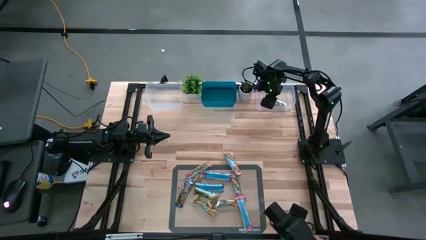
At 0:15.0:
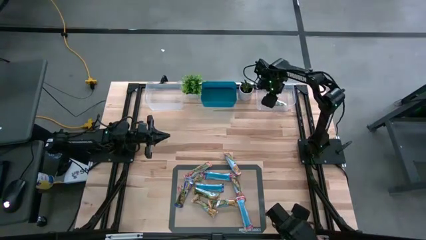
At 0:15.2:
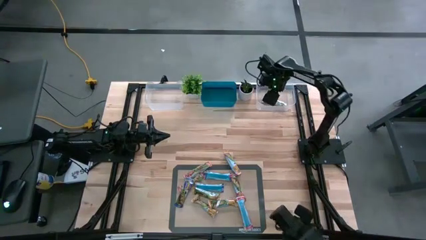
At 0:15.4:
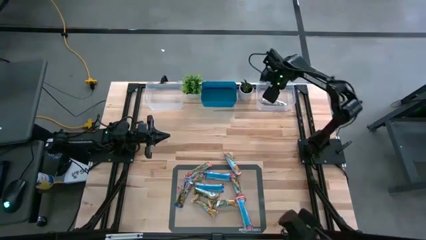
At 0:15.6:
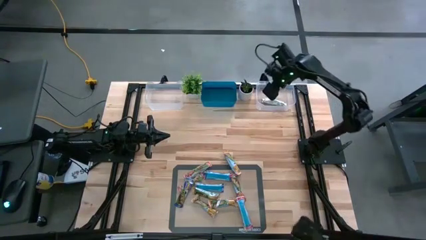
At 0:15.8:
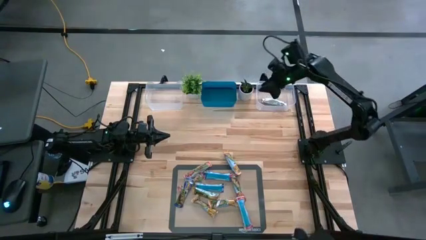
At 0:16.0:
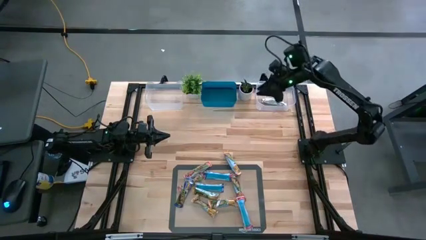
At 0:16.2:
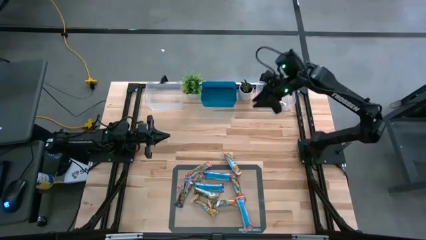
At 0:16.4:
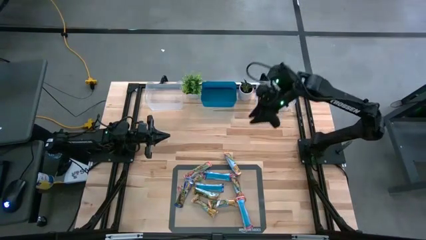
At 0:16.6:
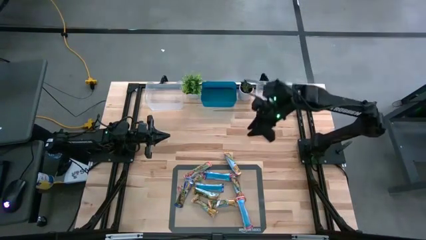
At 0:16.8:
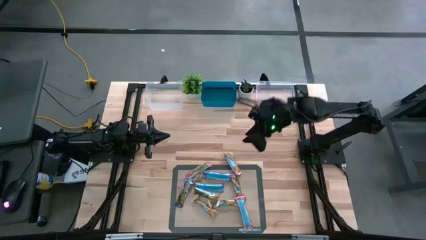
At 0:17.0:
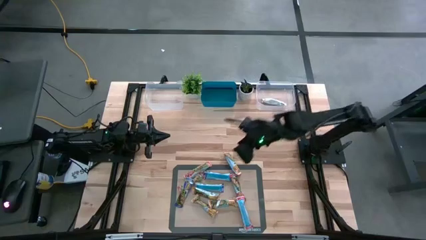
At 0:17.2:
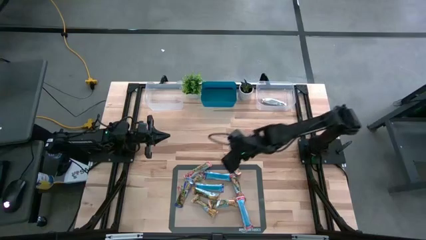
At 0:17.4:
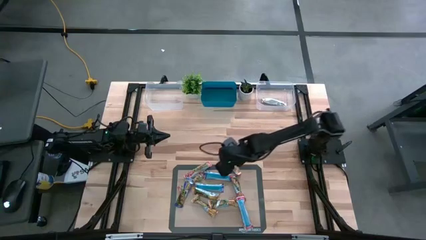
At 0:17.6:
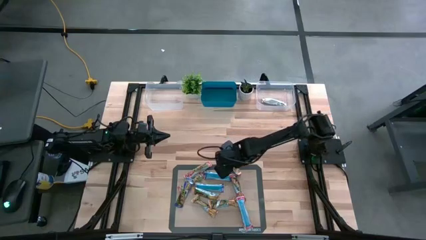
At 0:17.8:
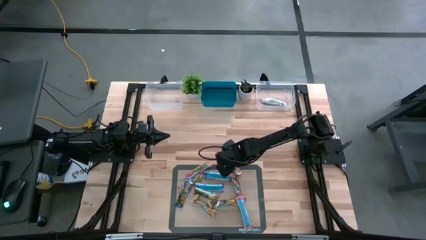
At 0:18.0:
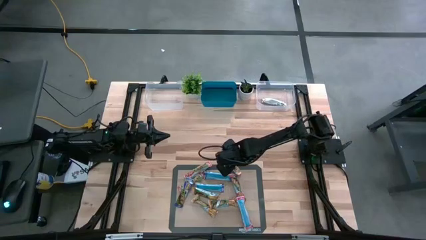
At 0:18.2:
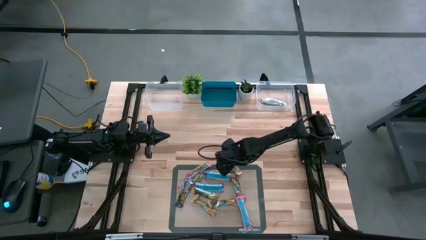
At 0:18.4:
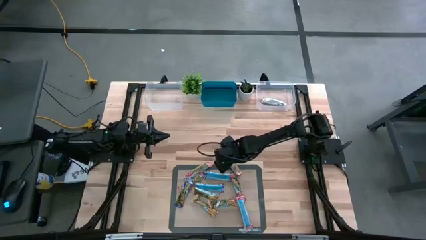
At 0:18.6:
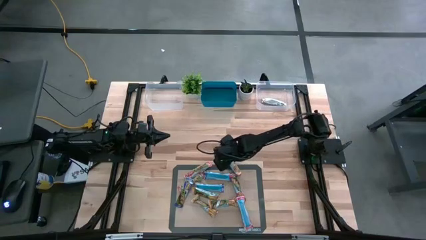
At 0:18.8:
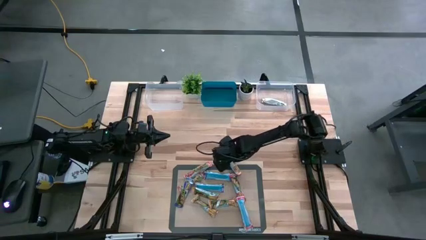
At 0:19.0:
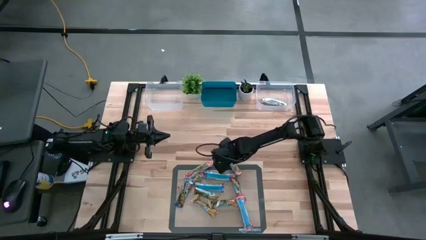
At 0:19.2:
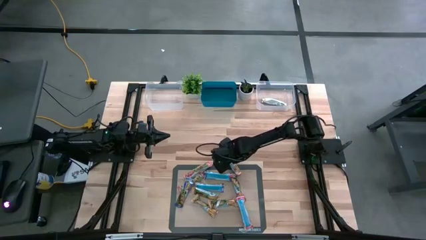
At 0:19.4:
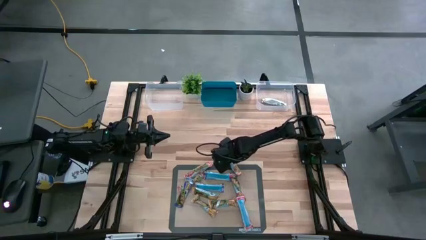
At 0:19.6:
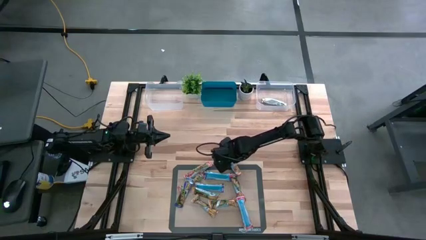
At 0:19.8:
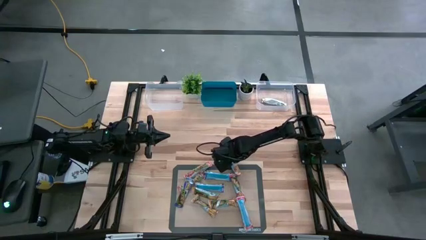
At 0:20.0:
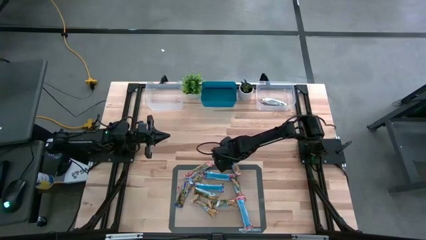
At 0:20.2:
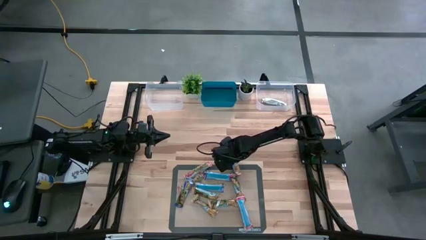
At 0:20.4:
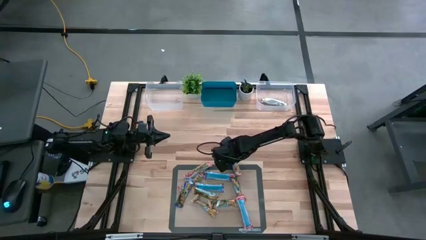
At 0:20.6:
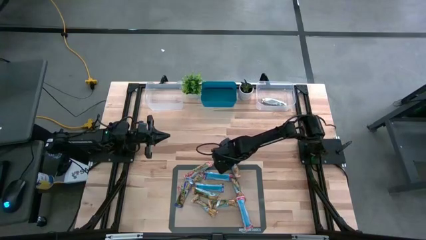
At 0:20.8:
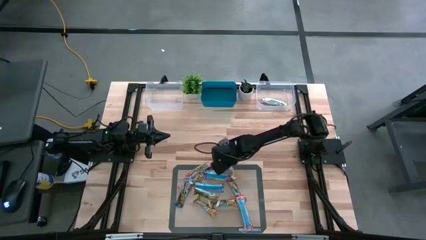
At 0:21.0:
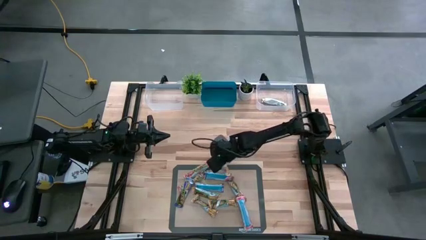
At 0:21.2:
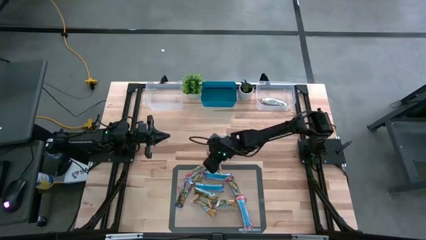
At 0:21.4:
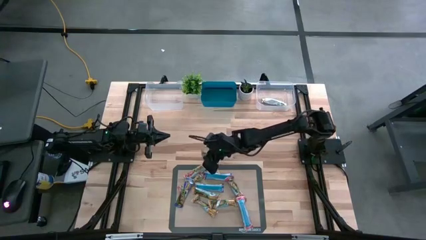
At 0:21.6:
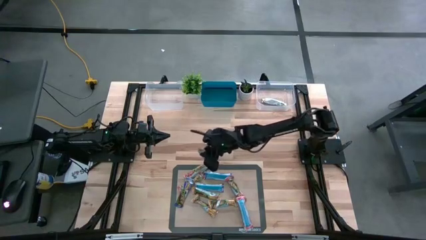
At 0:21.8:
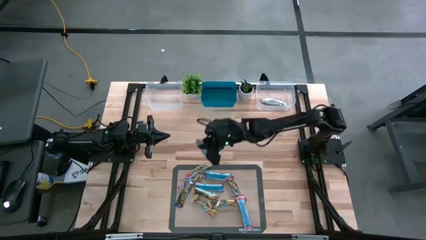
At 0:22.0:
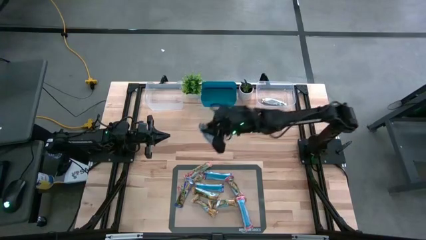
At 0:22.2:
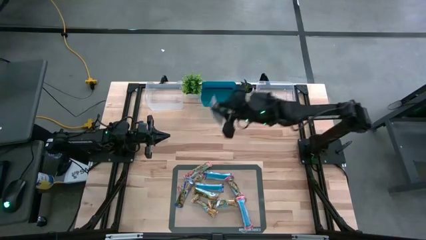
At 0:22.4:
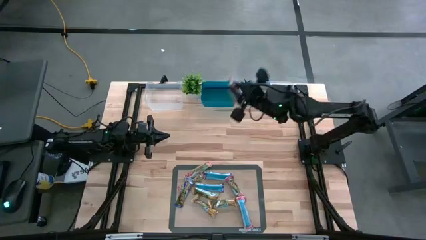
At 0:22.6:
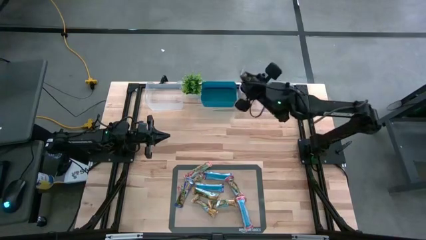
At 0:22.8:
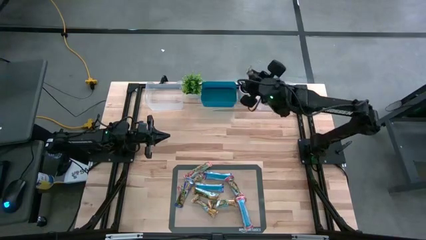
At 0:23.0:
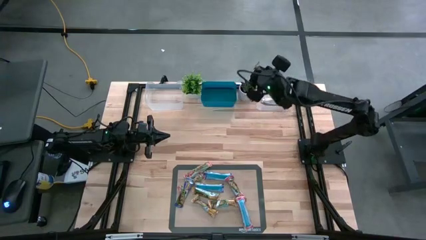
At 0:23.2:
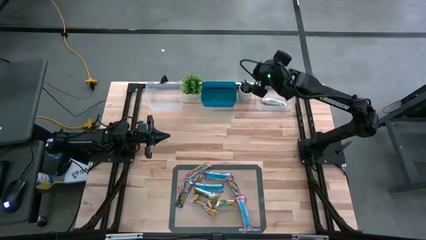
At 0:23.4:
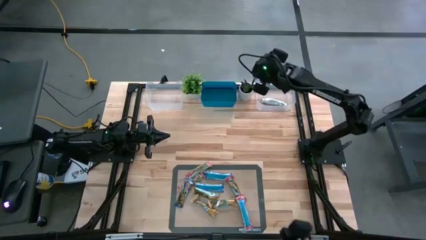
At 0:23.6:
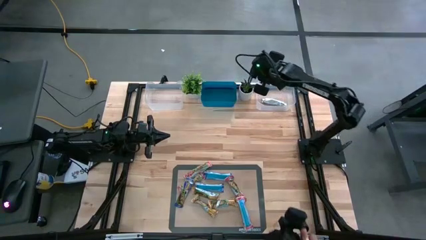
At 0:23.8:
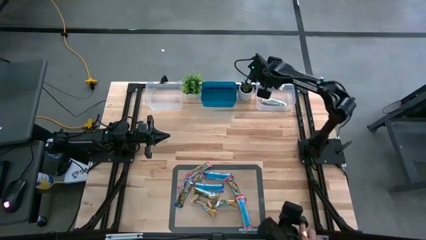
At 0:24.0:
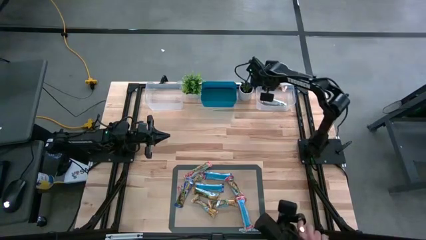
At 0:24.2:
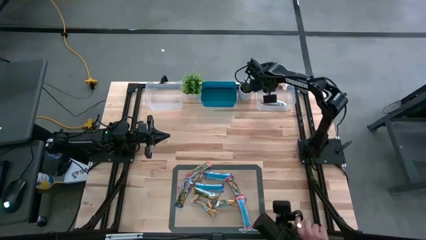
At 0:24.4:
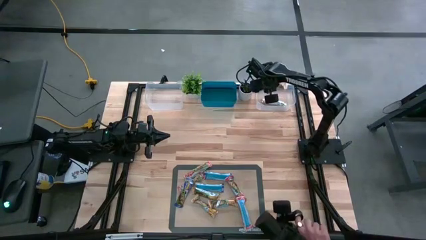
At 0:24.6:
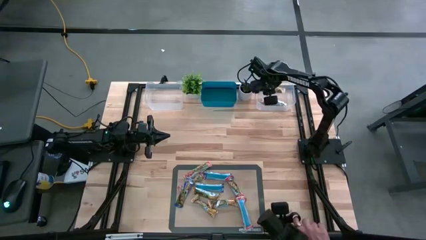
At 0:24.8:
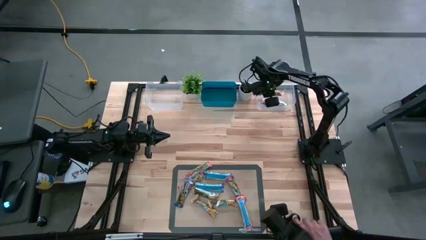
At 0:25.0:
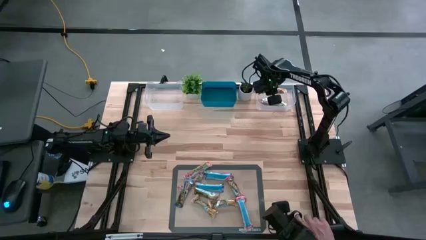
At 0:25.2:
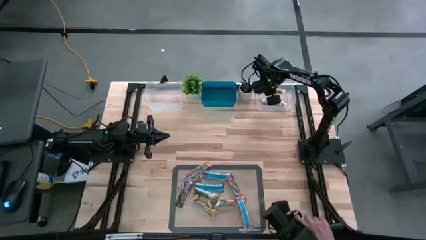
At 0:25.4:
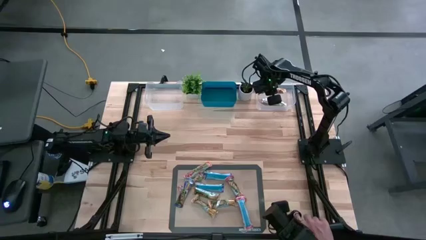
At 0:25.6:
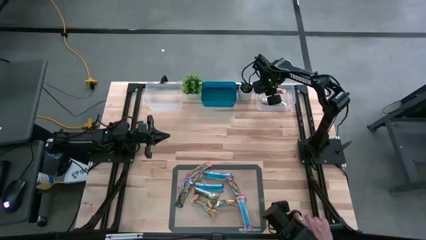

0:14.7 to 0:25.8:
Task: Pick and place Granola Bars by type
Put the yellow granola bar into the right transparent bin

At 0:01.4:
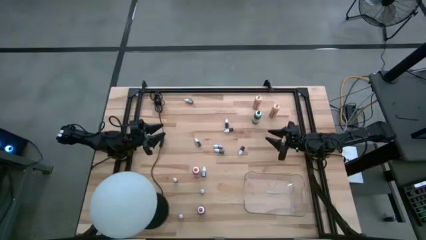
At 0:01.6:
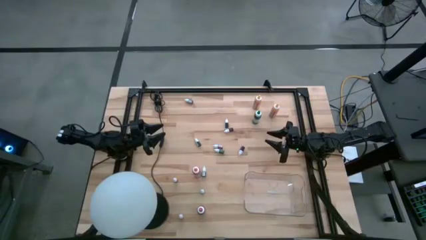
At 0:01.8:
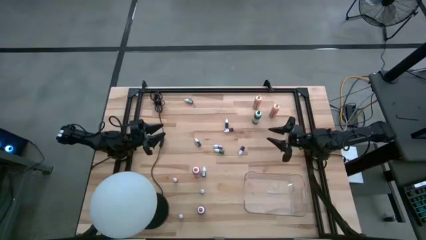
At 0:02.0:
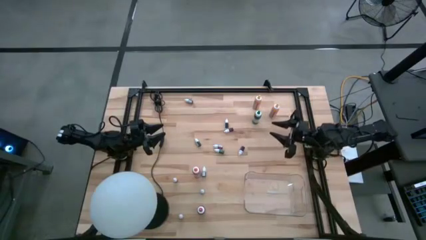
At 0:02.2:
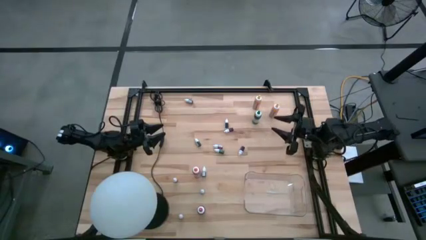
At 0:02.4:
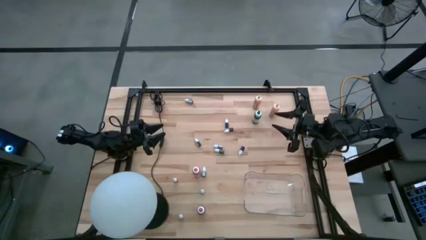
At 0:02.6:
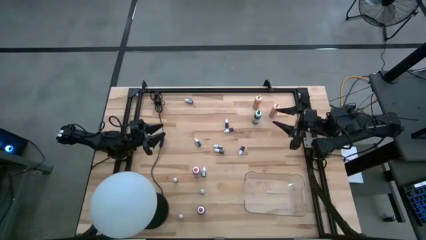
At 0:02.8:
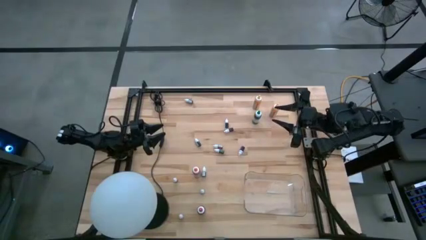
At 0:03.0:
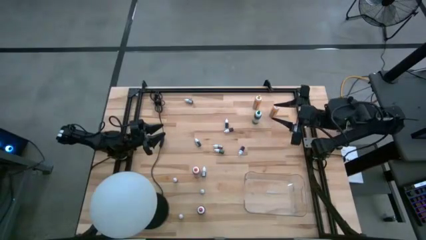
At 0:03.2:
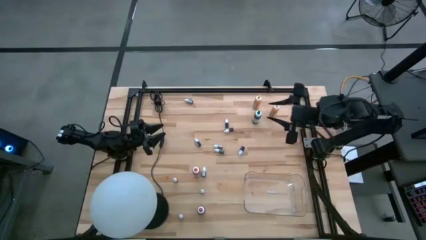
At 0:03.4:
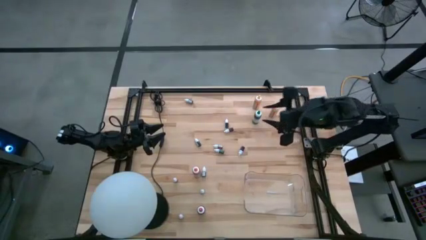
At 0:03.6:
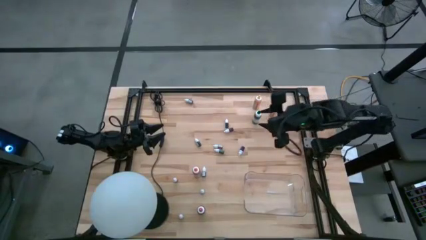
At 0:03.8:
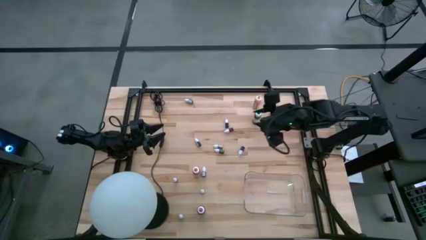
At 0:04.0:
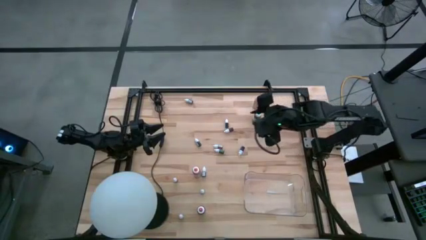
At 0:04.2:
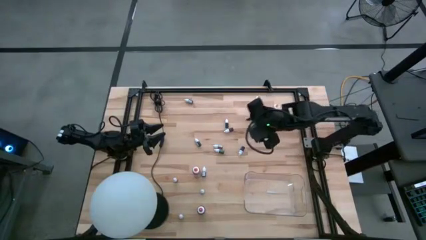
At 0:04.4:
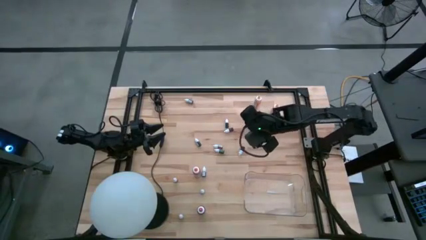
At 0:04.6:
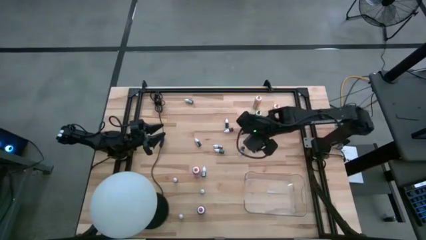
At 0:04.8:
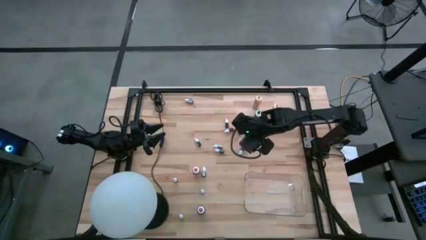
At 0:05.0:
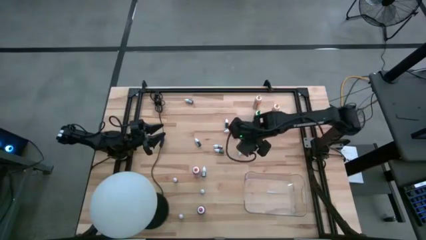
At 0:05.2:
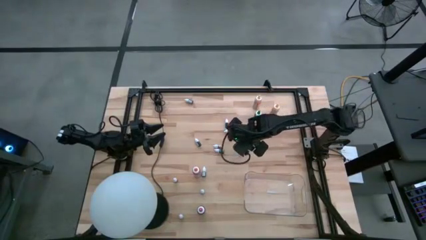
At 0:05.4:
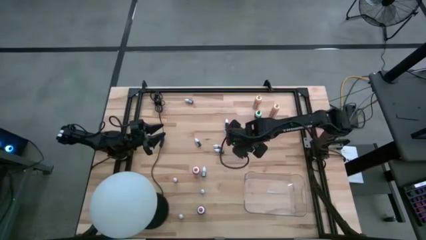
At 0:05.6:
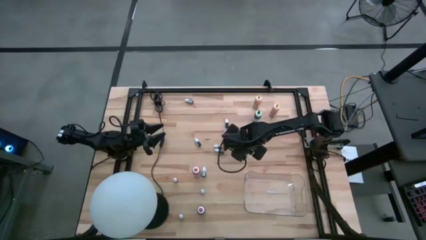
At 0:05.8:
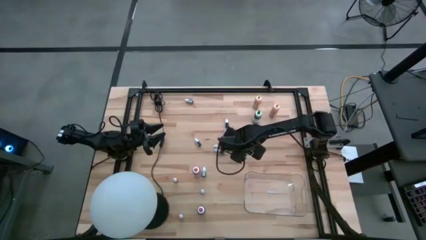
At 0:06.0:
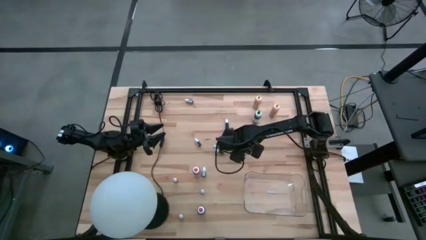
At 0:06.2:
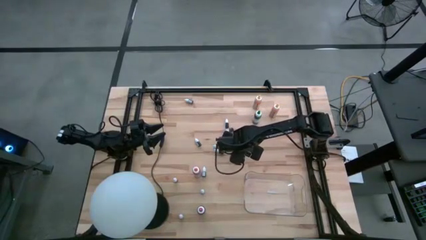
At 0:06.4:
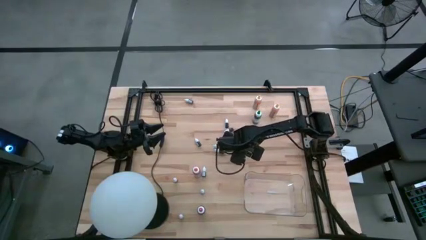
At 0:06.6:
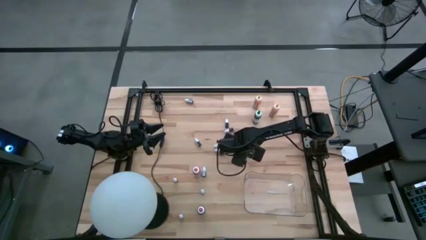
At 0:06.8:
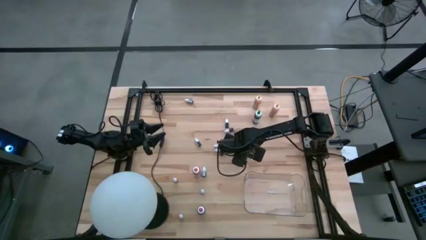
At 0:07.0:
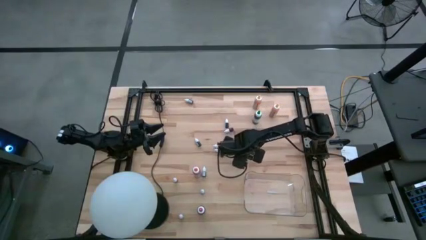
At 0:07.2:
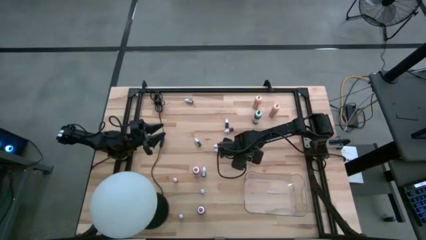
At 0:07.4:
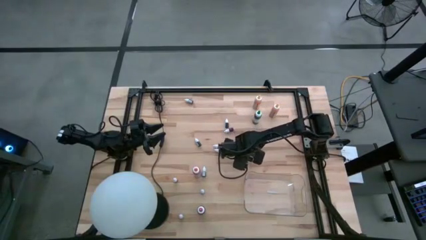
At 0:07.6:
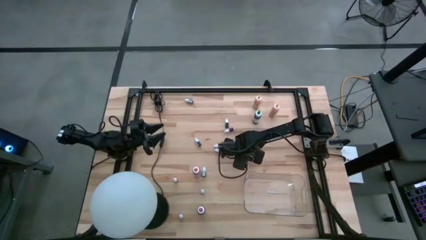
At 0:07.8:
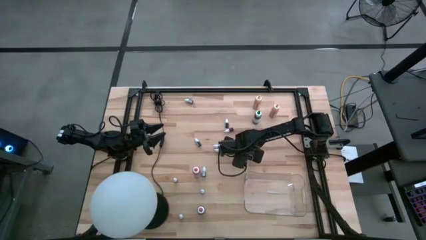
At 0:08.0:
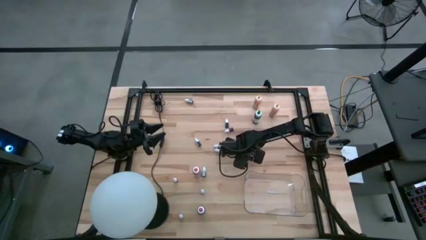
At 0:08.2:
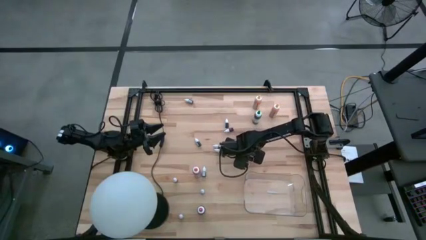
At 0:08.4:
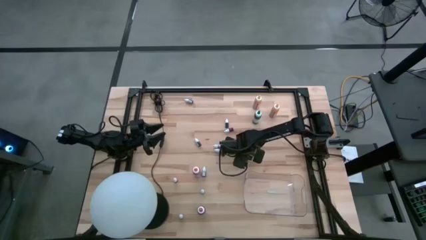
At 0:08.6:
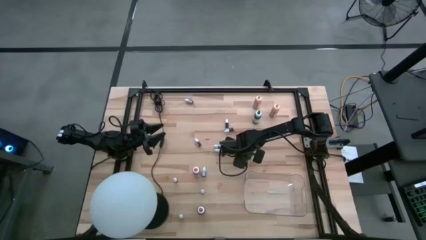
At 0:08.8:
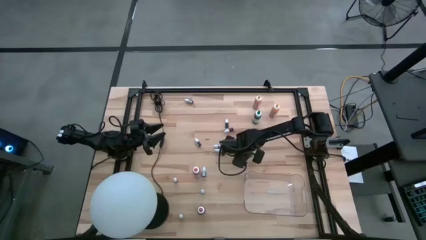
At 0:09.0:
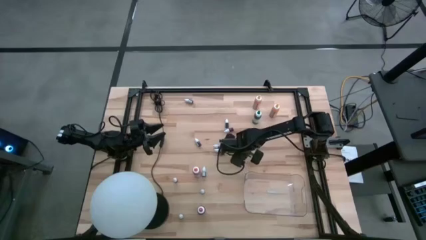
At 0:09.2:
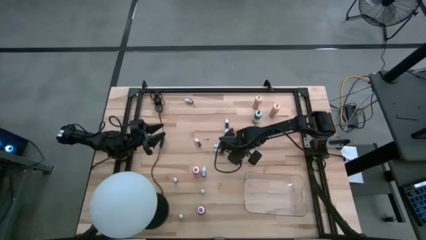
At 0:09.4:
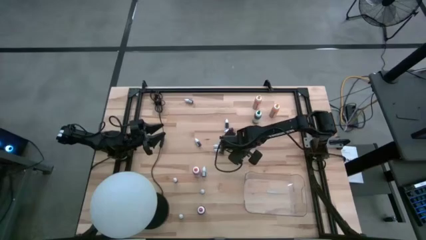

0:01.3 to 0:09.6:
Task: Pick & Place food coloring
Put the violet food color into the transparent bin
